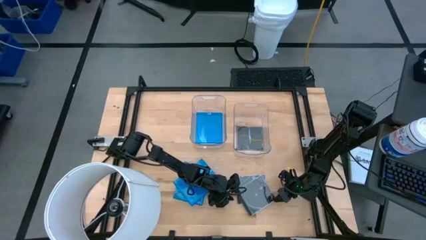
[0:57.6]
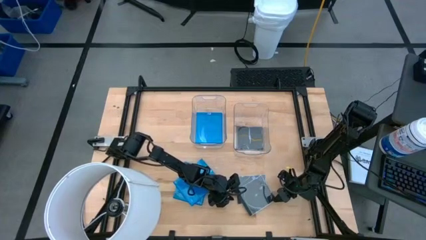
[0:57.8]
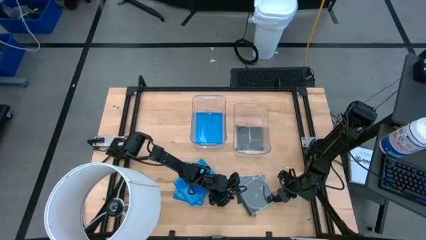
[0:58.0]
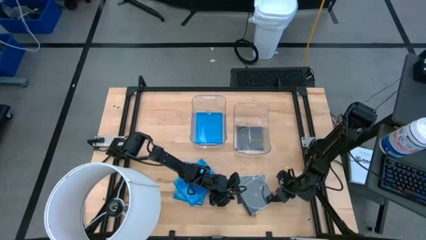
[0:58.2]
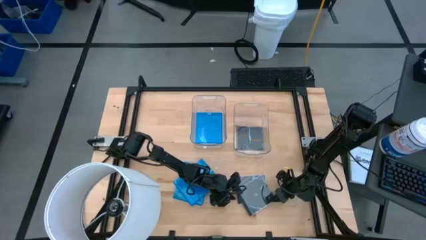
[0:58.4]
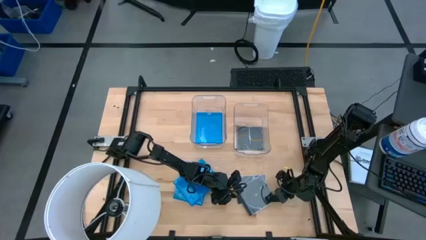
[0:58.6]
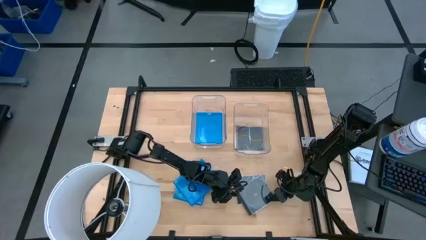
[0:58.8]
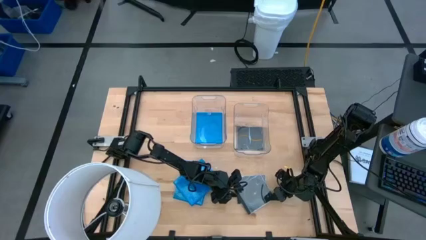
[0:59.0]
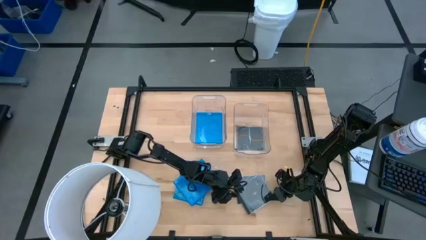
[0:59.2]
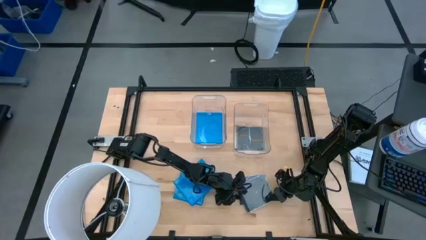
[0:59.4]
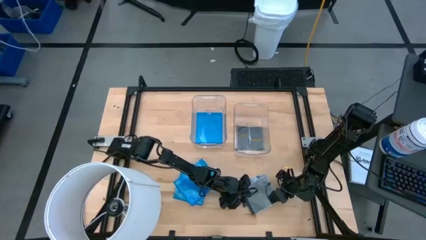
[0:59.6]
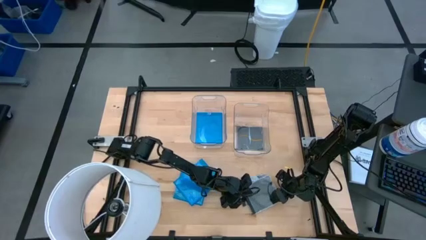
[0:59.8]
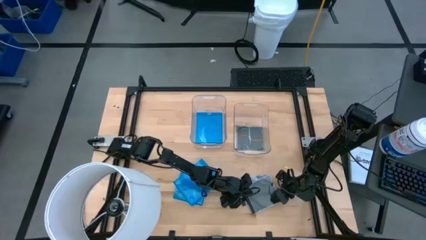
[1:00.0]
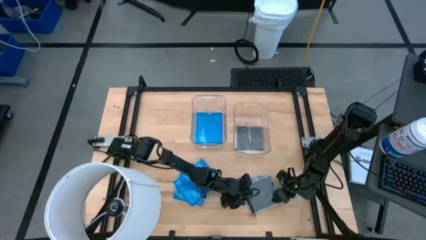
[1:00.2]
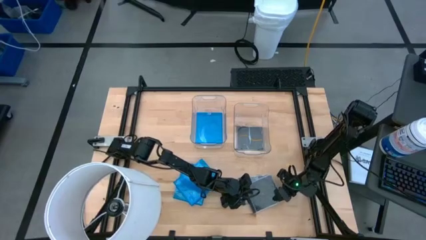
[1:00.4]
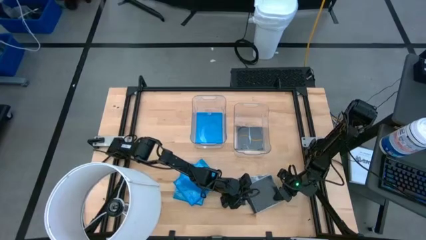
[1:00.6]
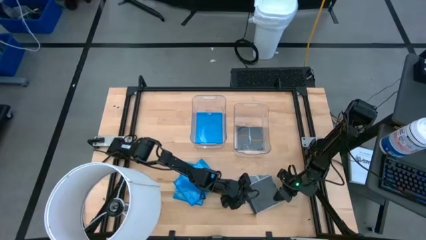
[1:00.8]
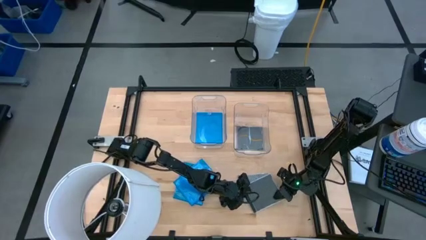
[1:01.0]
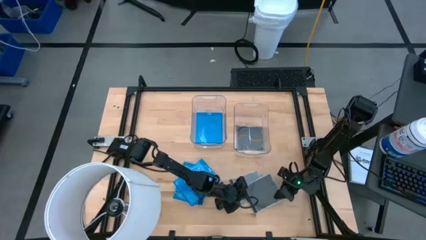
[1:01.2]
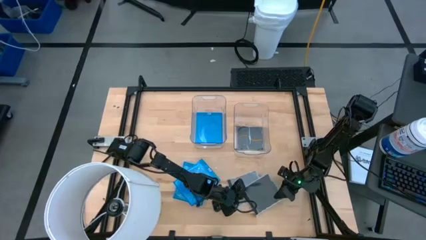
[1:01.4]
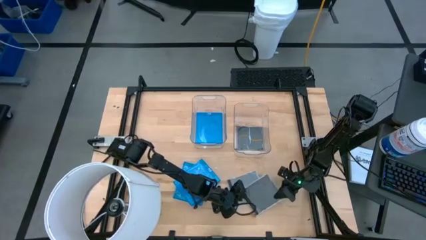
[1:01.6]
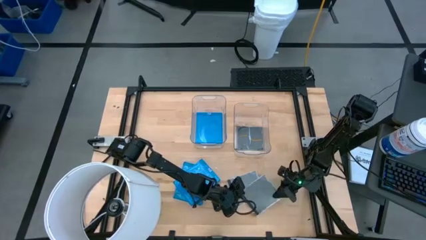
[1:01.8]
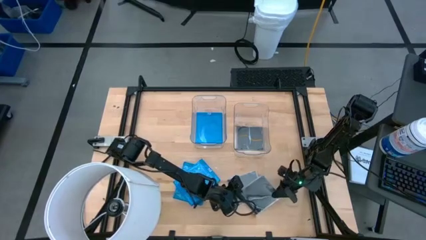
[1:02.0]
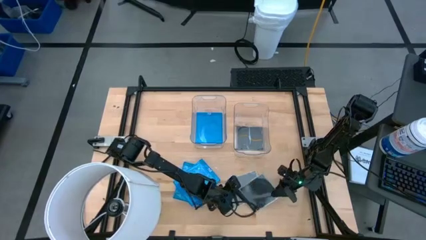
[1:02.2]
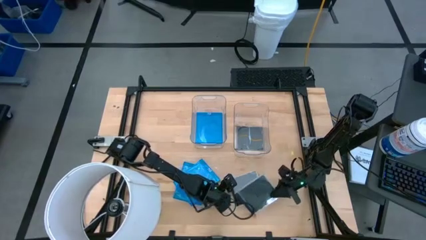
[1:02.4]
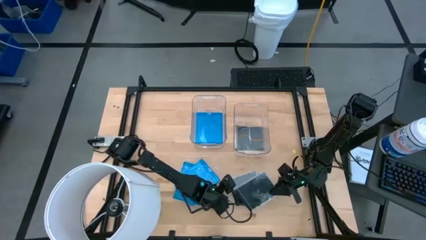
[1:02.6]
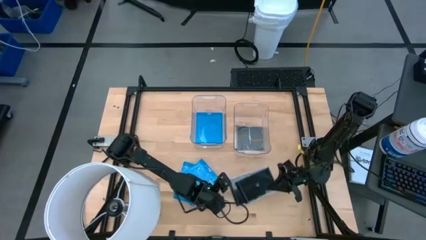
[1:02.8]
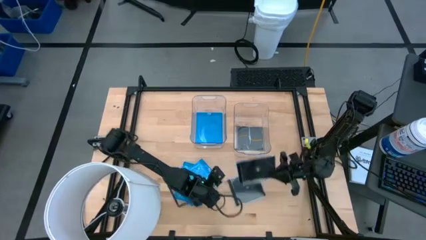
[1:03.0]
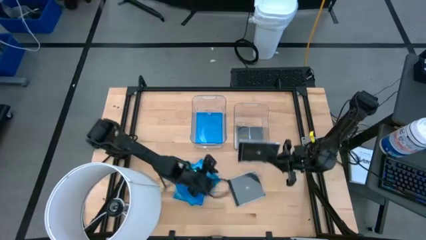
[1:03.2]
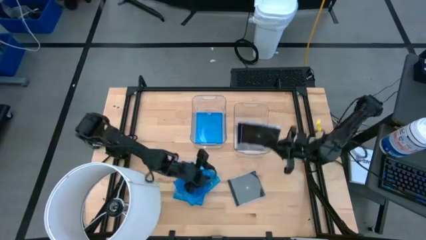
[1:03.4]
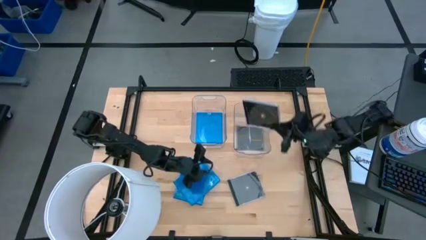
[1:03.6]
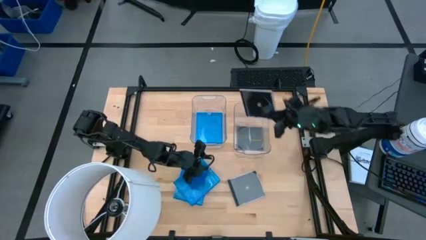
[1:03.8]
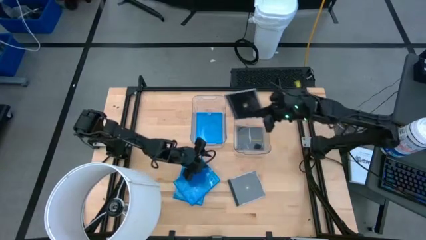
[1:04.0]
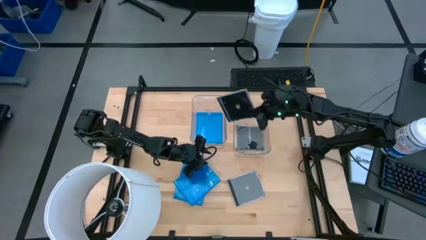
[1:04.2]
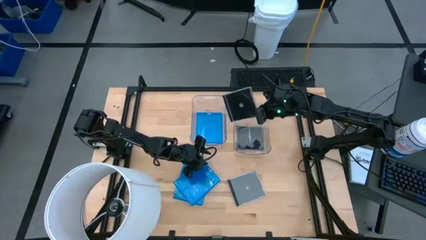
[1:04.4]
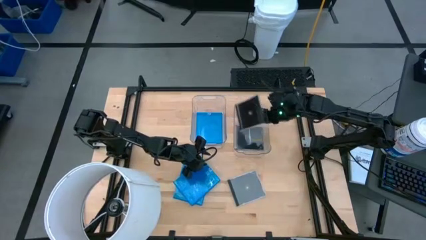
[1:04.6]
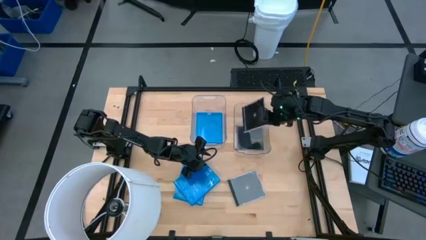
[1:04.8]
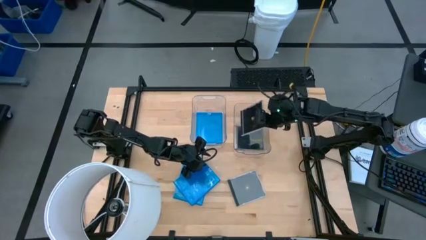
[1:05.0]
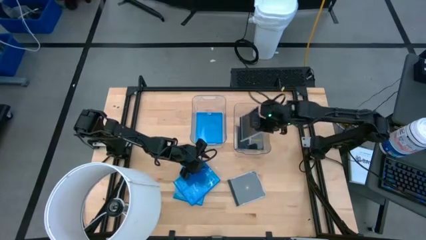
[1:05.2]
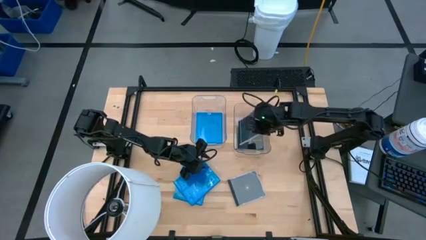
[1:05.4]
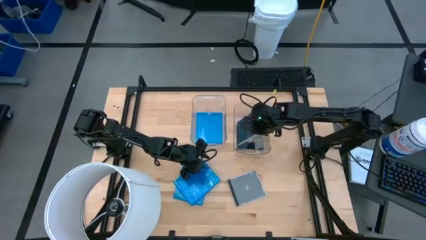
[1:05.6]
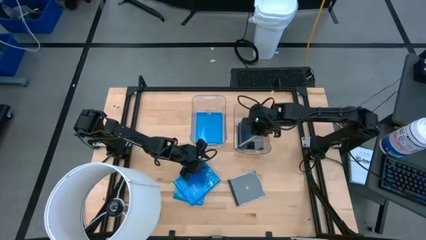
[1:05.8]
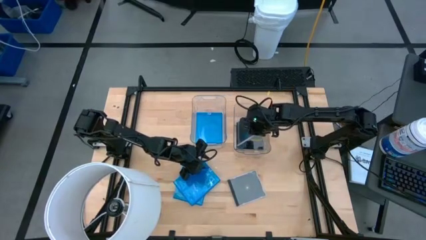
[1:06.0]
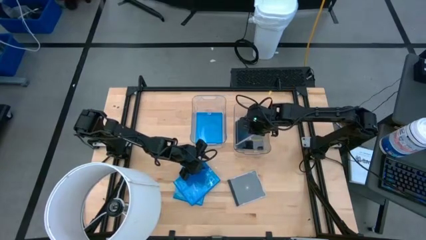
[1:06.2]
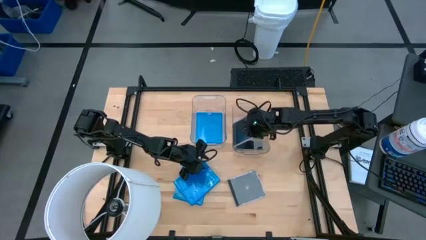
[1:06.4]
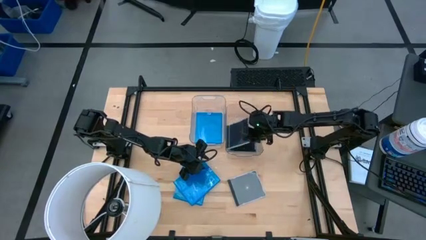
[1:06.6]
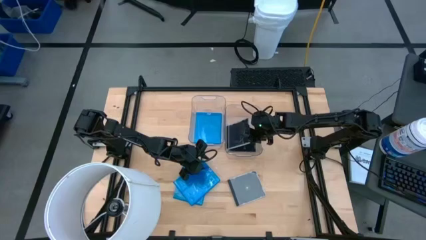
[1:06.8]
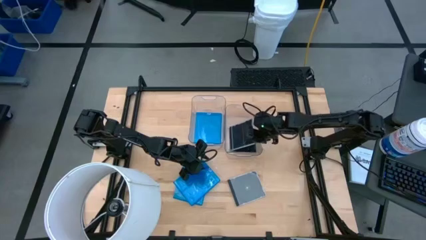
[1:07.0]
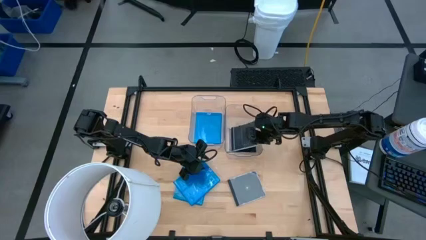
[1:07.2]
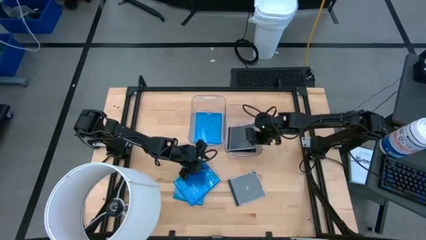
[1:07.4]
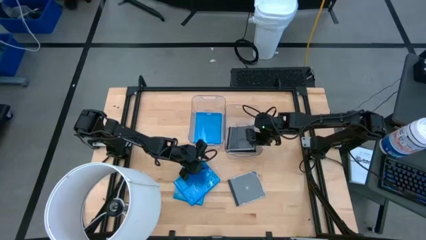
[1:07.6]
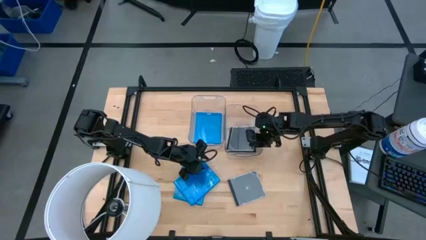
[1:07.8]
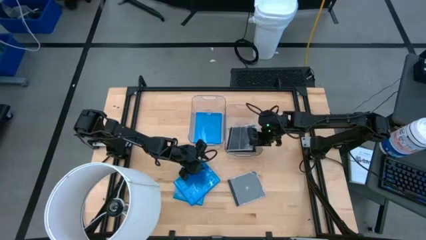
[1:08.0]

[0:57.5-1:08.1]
Task: Pick & place jewel cases by type
Put the black CD case into the right transparent bin

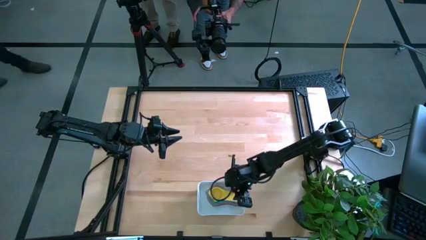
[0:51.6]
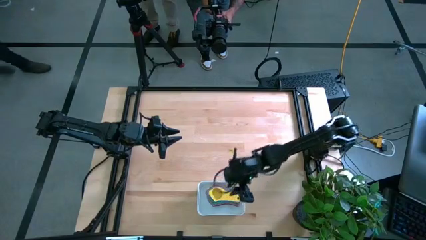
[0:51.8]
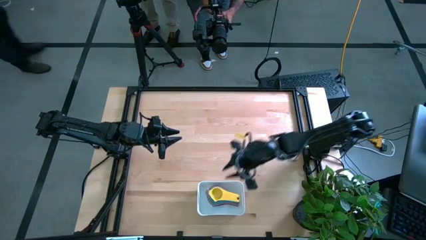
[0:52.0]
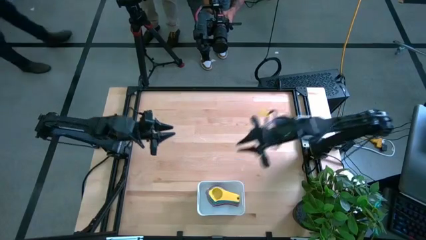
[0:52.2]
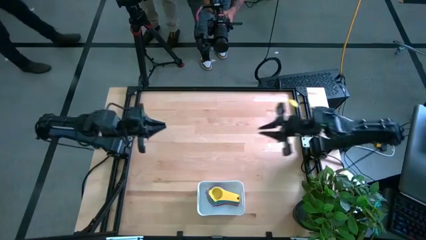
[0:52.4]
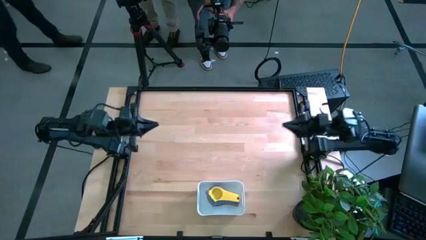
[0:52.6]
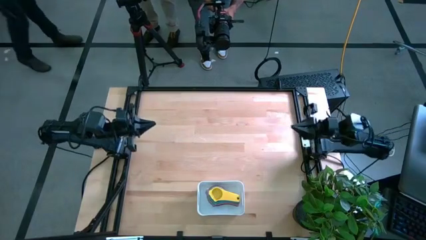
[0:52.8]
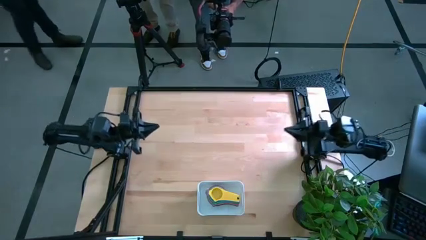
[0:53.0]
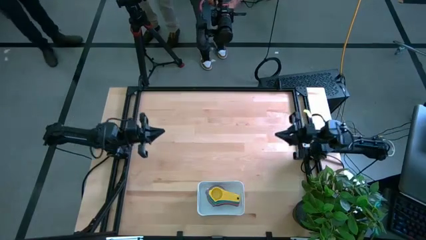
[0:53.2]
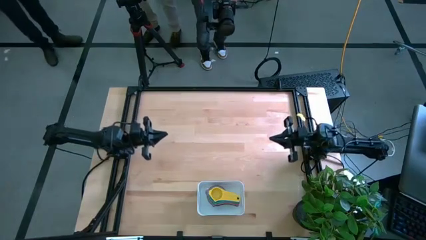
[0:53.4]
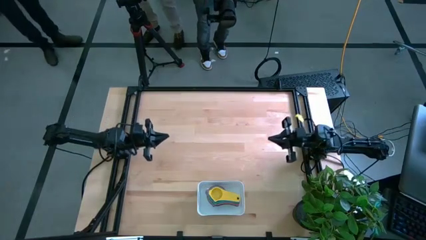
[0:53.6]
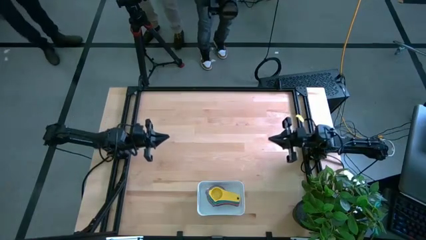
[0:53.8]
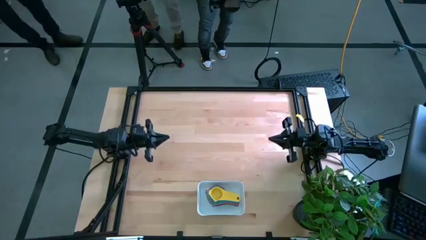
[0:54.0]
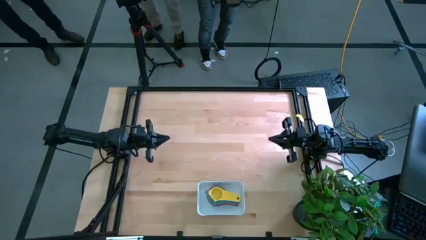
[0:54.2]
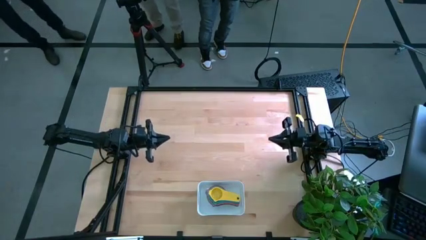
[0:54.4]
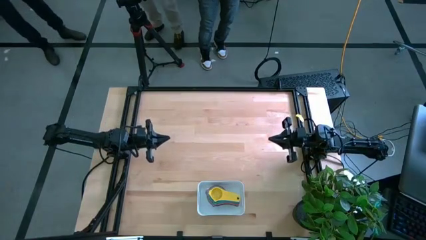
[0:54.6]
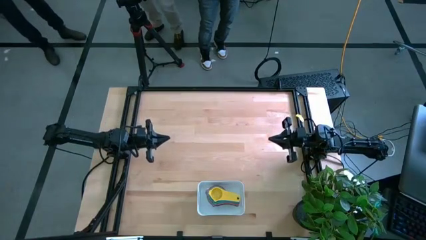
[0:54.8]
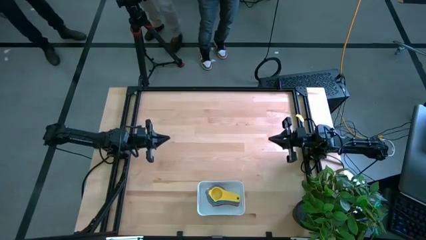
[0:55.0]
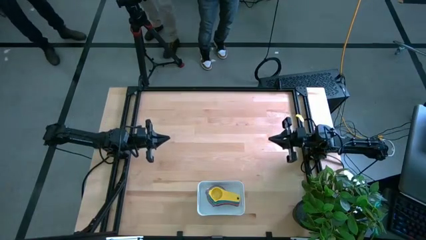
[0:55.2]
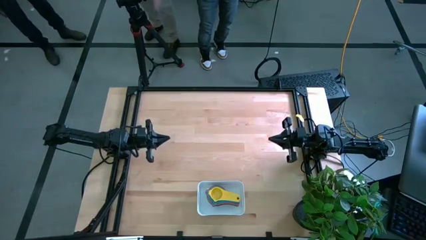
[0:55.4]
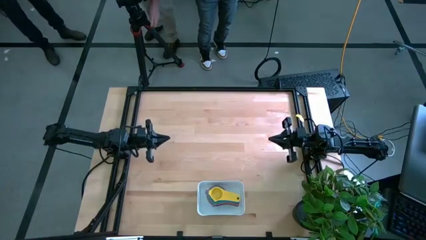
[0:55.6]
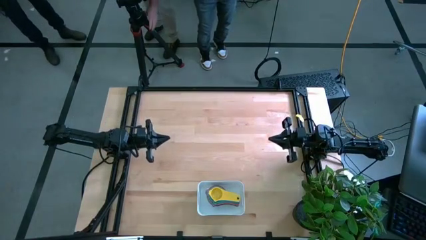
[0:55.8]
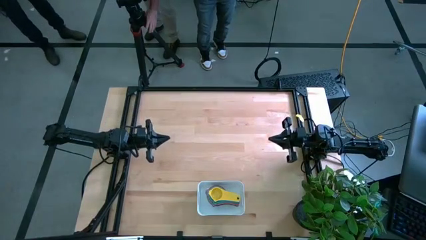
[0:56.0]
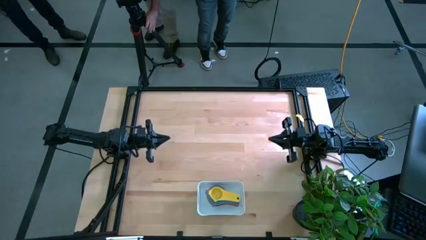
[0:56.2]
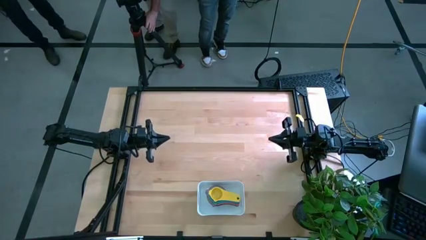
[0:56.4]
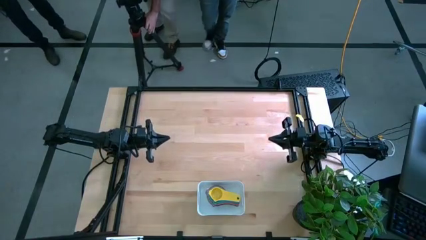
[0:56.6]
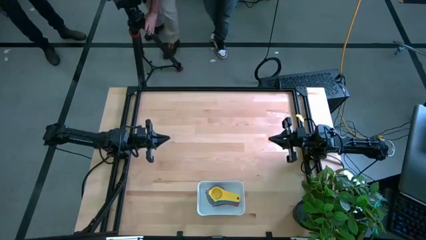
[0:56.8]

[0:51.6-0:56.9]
Task: Nest measuring cups in basket
Return to Home Position
